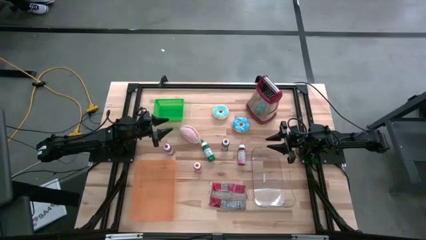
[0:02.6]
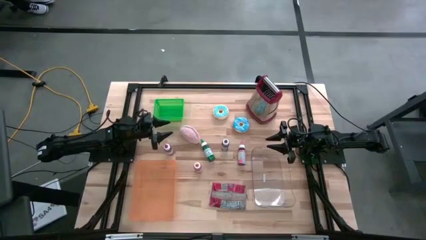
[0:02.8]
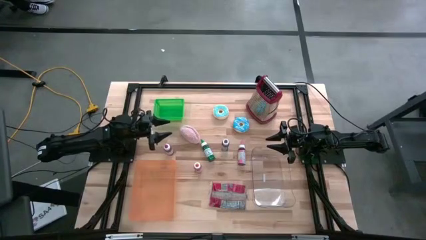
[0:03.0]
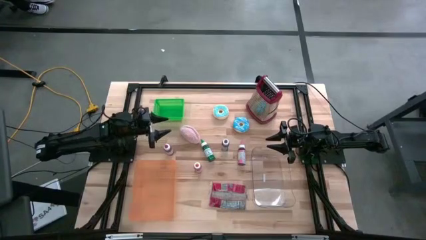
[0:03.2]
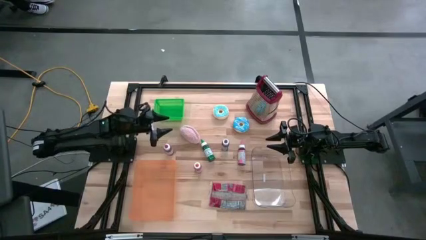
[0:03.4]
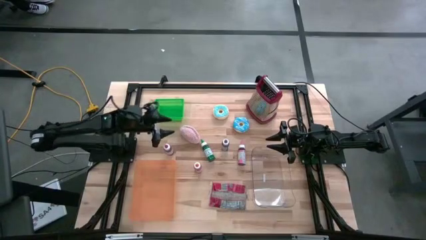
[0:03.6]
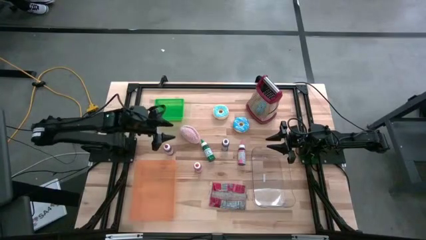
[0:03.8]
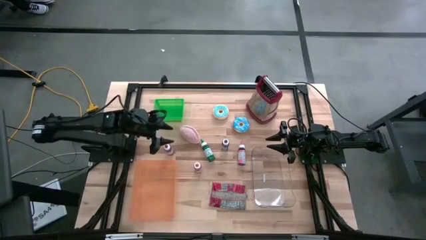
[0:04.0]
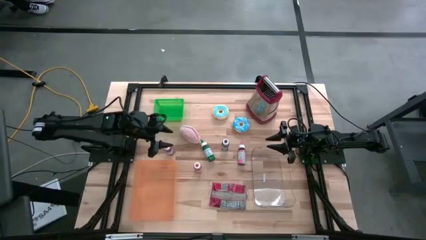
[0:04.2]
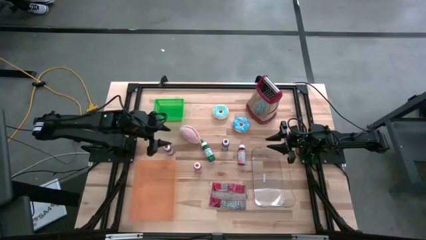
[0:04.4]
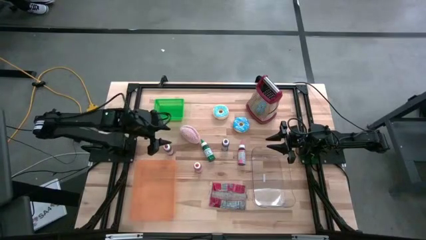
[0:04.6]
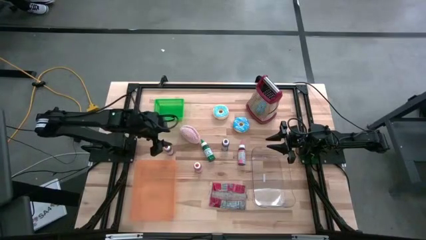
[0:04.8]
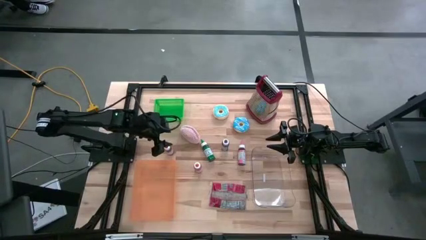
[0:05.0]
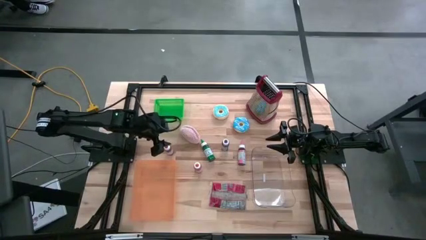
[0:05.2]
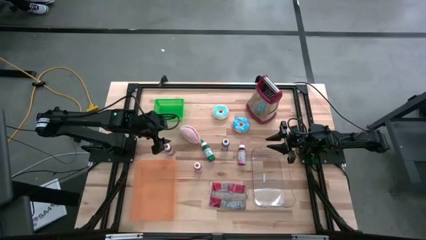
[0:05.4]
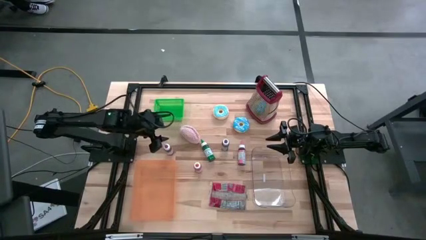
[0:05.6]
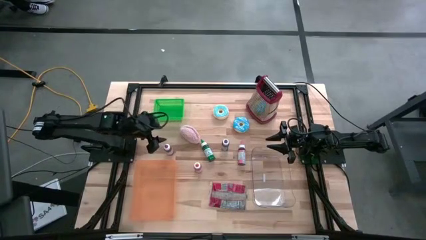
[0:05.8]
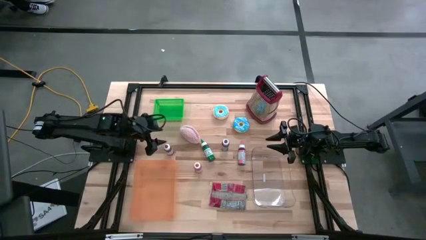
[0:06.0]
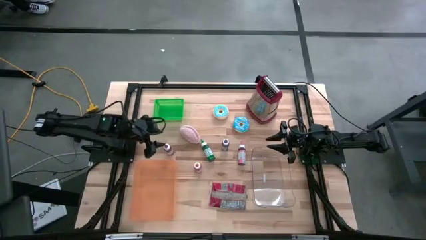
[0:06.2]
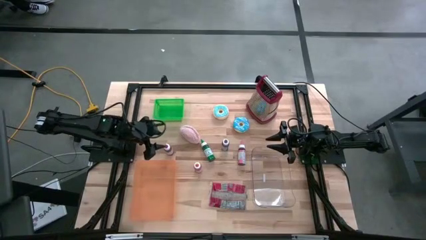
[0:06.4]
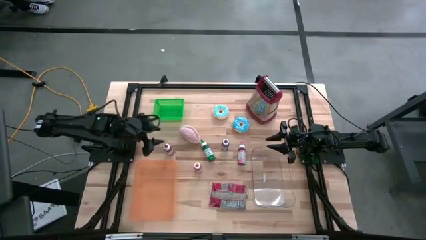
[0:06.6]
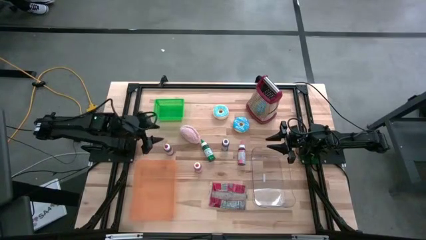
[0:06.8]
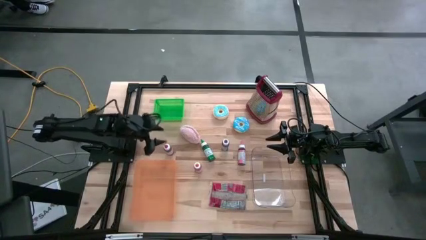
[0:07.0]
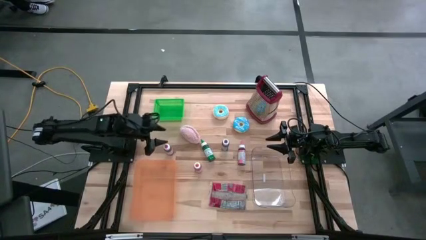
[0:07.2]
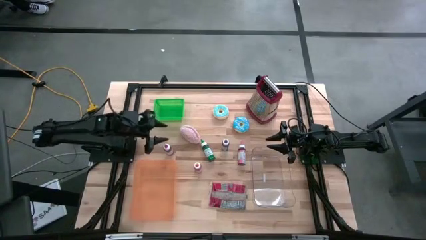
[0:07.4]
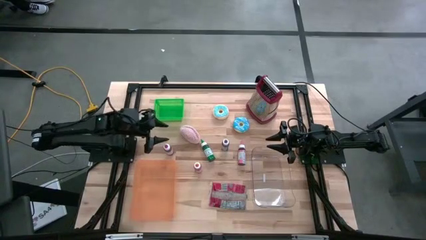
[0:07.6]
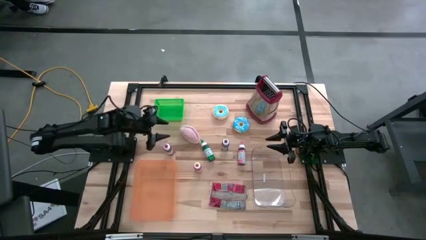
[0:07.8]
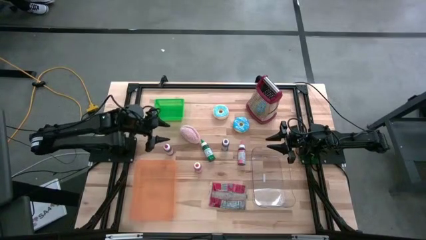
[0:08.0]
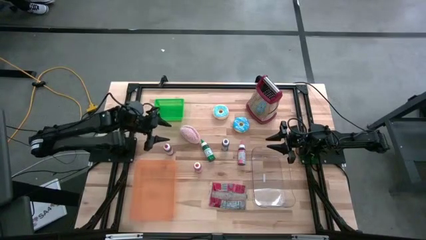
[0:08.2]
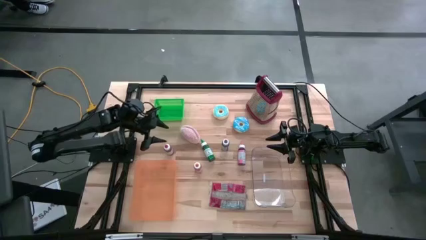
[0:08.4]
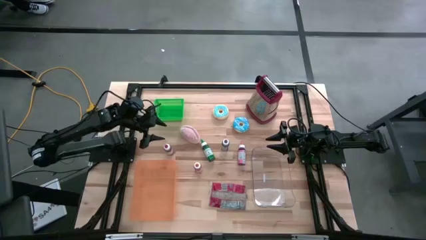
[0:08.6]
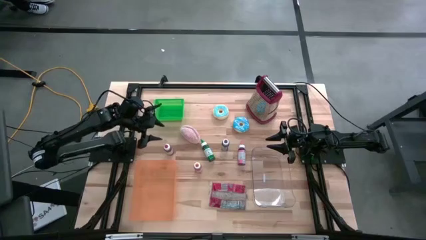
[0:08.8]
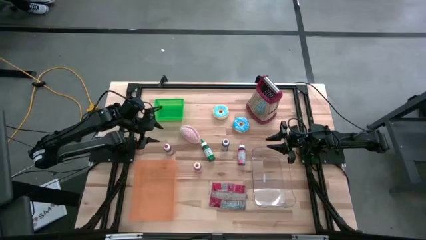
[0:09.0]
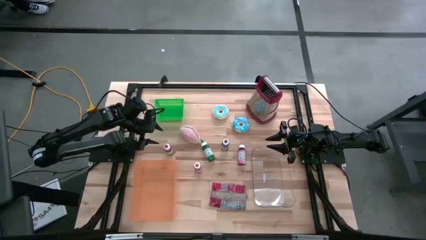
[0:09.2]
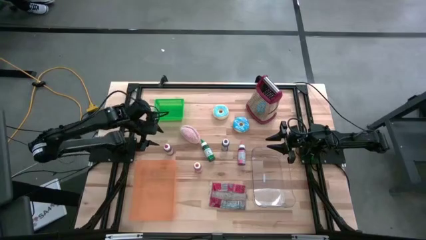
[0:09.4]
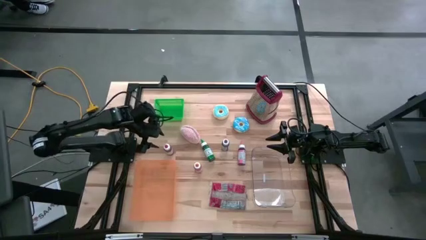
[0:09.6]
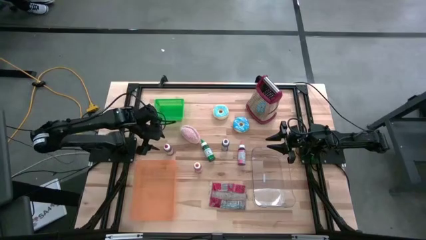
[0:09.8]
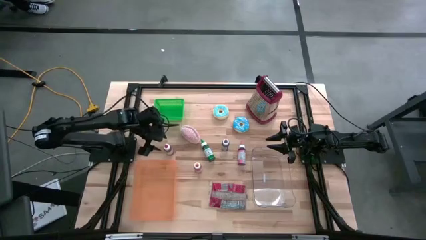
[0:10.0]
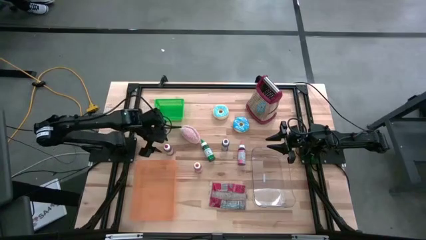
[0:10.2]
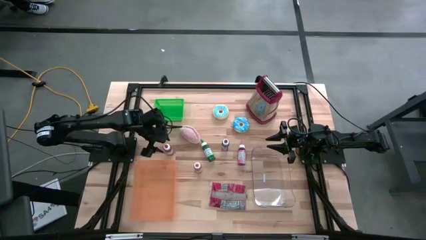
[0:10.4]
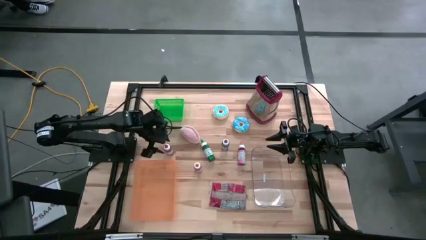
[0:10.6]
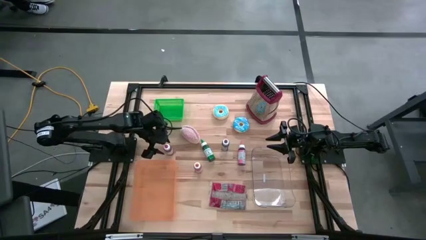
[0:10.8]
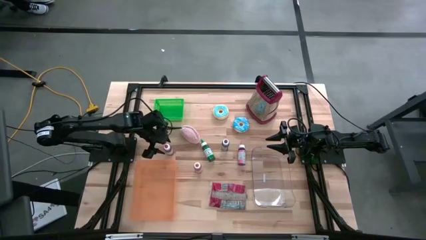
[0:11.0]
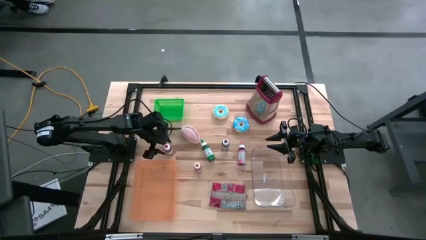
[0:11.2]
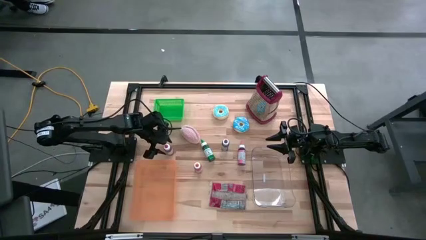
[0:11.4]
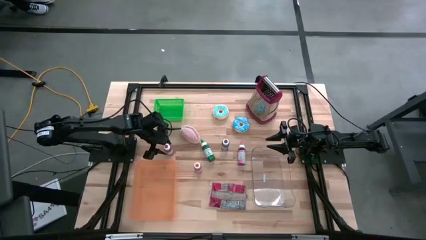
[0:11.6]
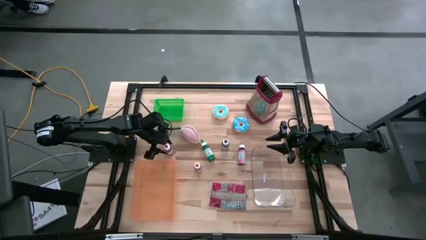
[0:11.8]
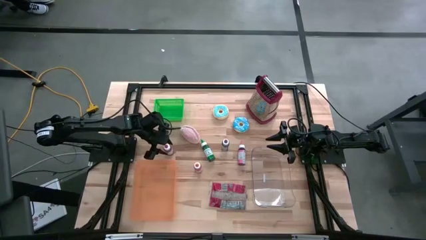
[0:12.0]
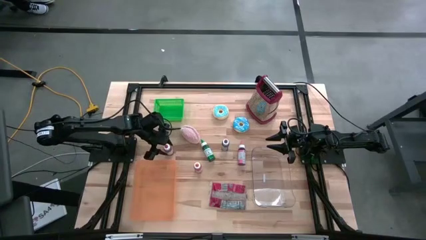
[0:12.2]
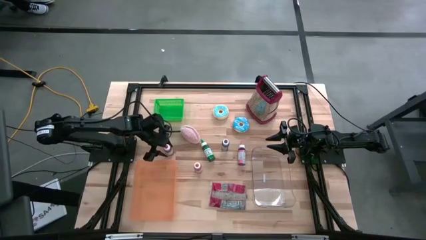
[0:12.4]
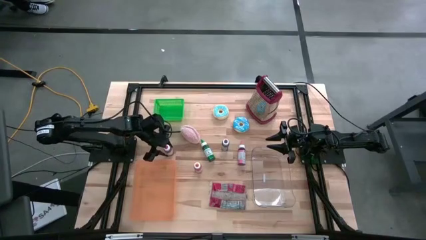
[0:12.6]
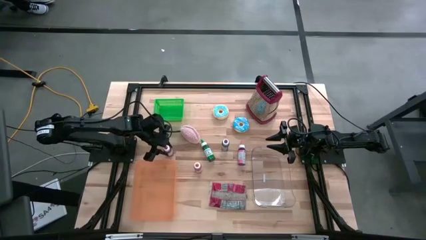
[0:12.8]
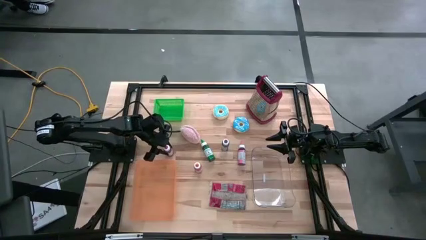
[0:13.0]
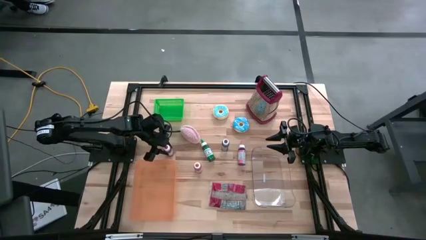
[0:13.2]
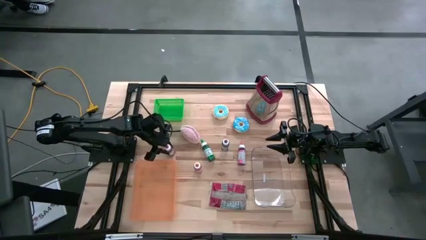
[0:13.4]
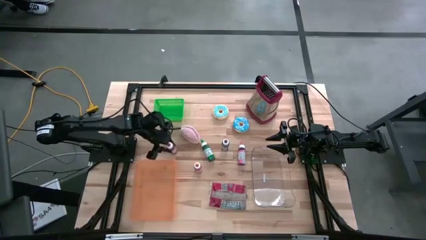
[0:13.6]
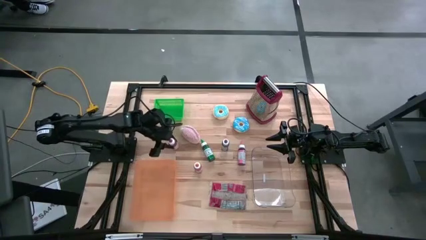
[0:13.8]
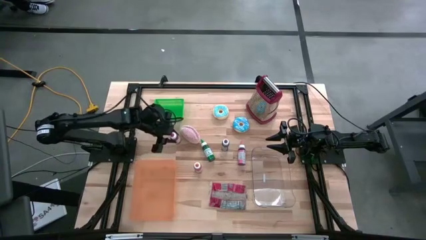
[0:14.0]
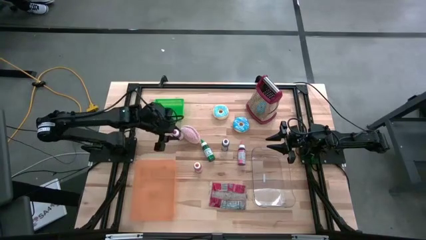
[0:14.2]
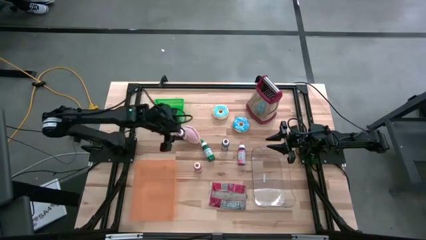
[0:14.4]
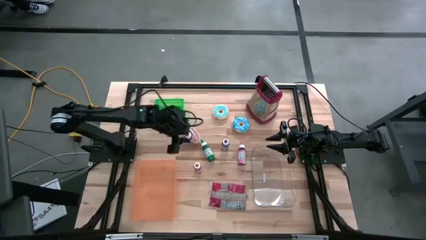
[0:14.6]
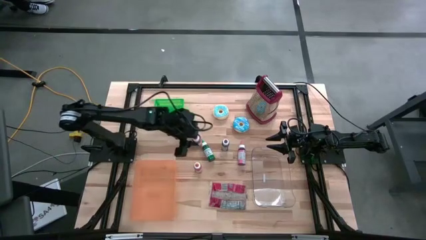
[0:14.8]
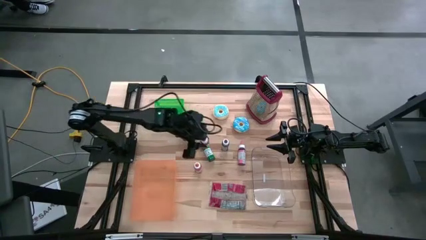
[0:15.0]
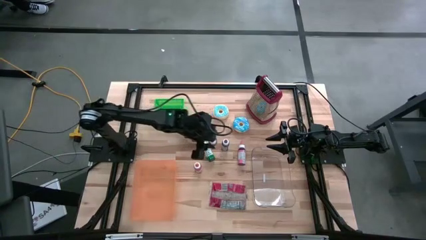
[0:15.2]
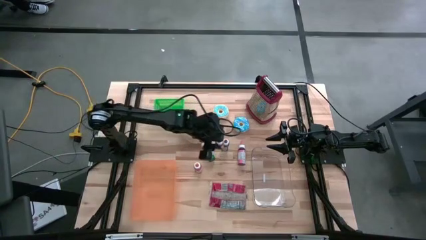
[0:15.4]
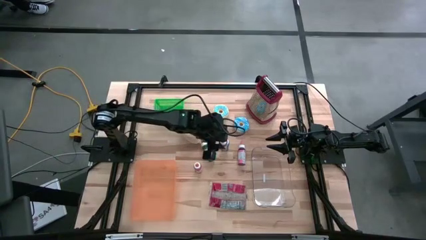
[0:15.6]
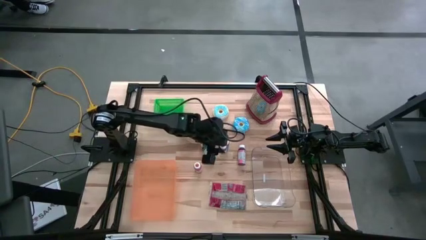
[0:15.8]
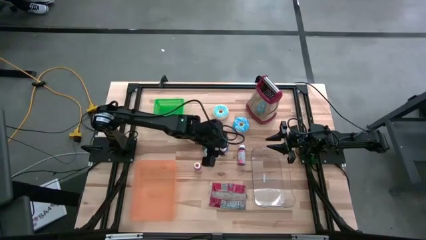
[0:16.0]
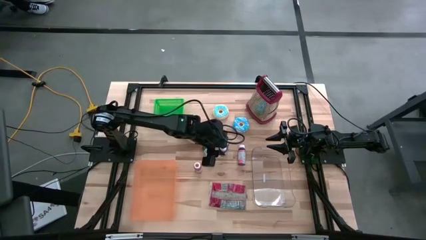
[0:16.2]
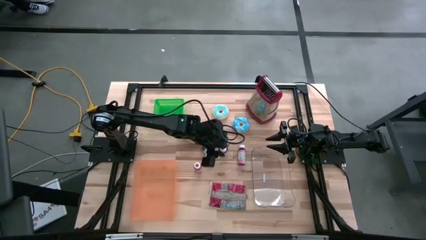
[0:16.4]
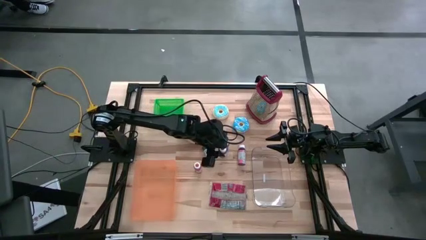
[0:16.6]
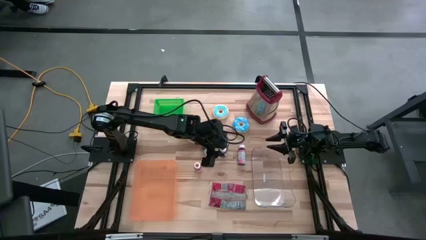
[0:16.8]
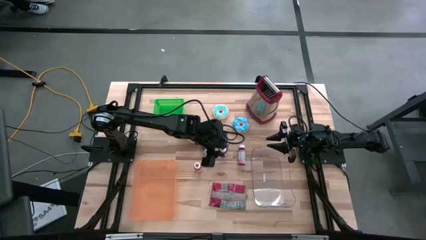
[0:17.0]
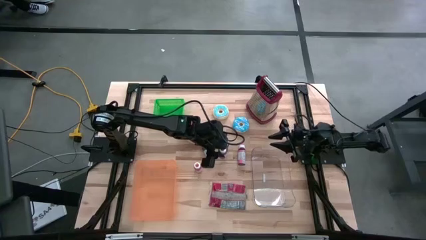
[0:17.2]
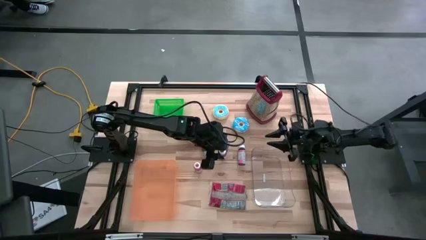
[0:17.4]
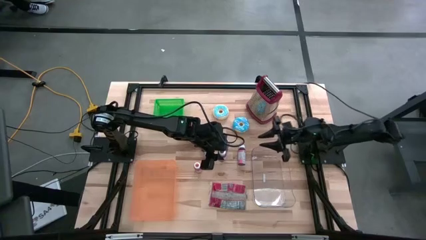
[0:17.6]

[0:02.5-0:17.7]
Put the red paint bottle into the transparent bin
